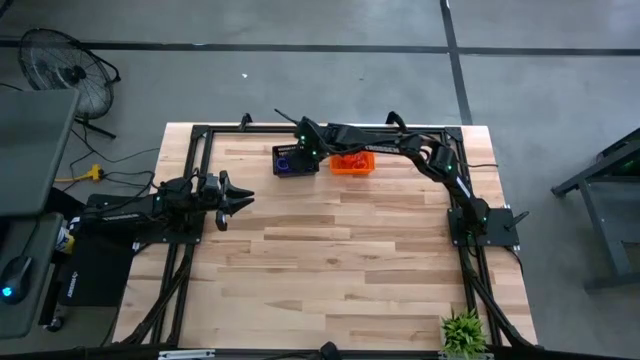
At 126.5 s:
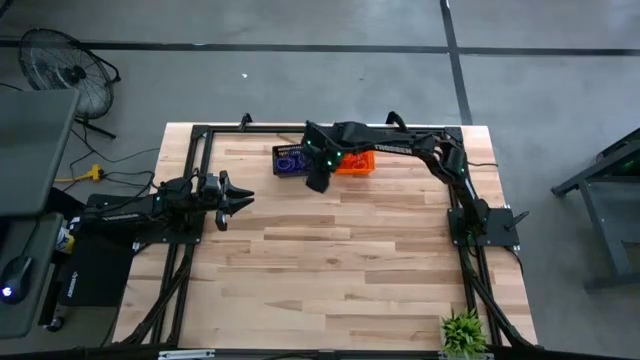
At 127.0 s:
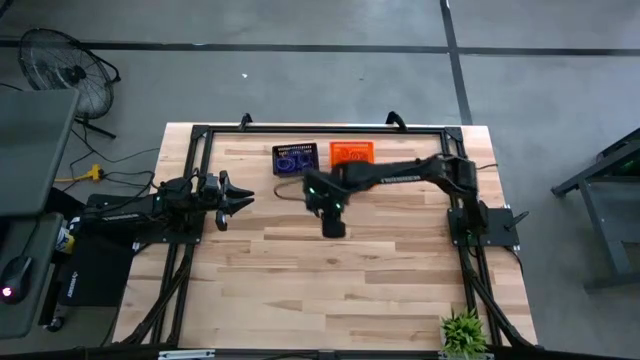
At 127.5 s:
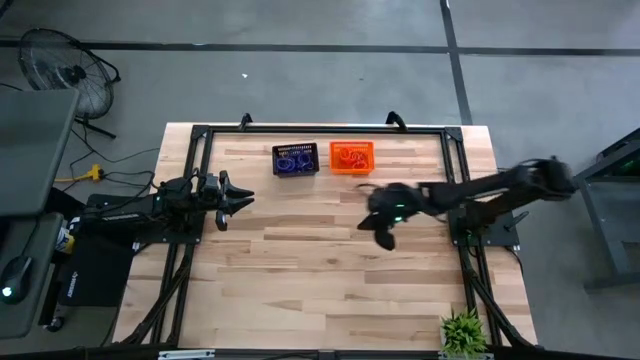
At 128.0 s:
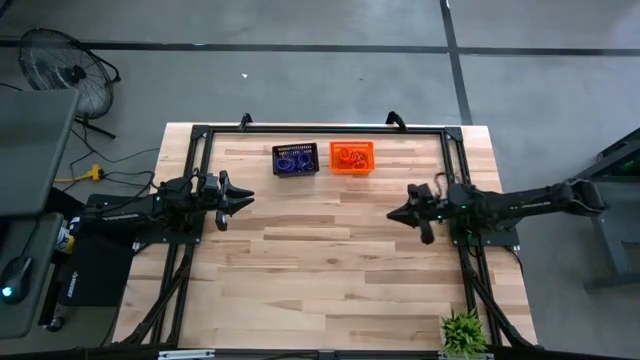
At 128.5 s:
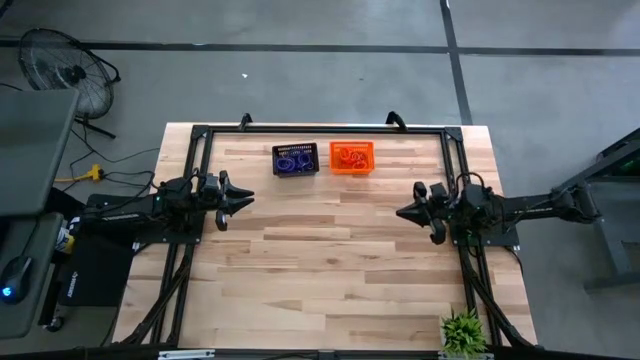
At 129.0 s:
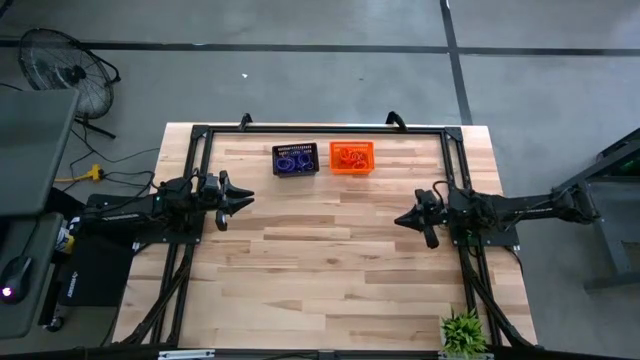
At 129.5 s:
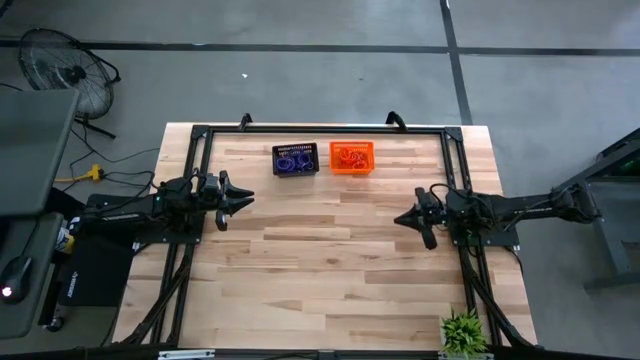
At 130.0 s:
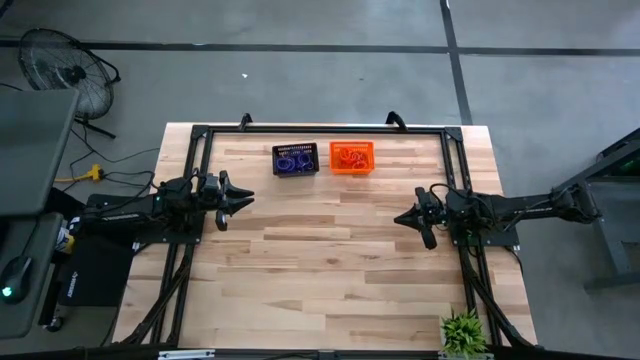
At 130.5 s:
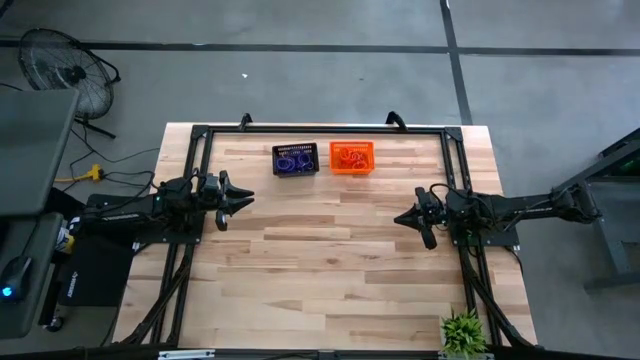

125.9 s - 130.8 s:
Task: Sort spring keychains
Return to Home Position

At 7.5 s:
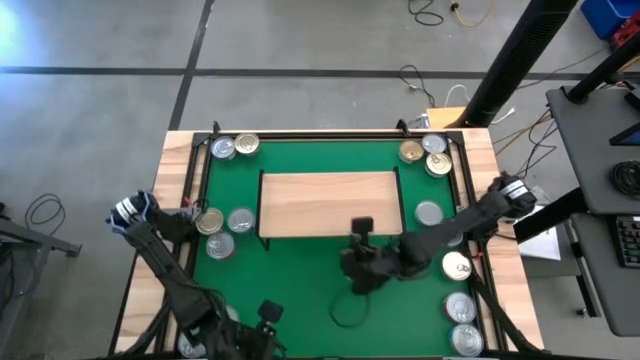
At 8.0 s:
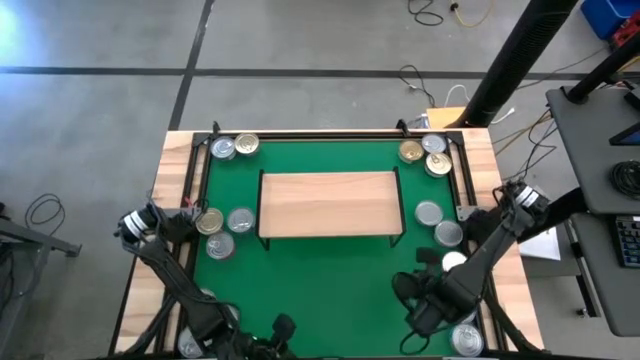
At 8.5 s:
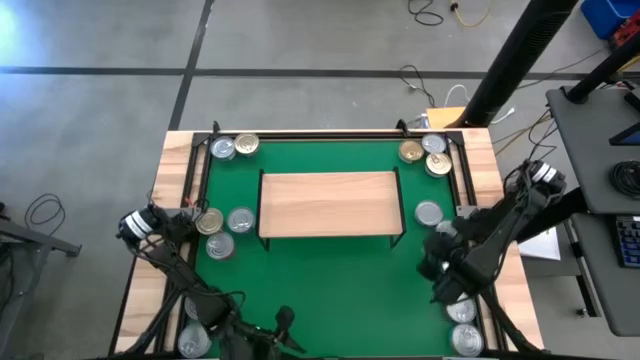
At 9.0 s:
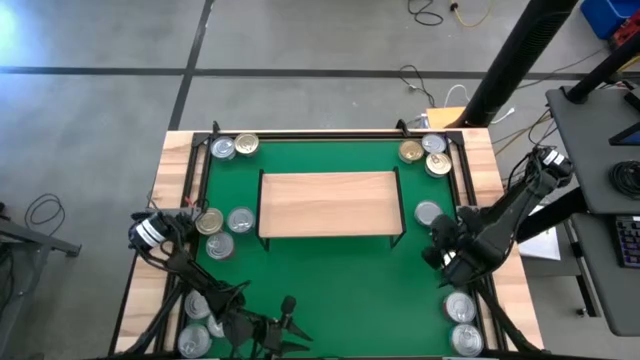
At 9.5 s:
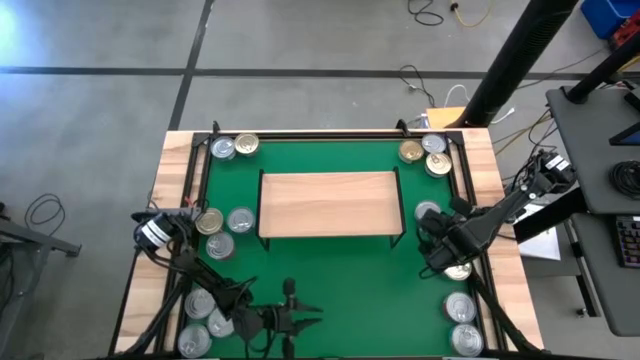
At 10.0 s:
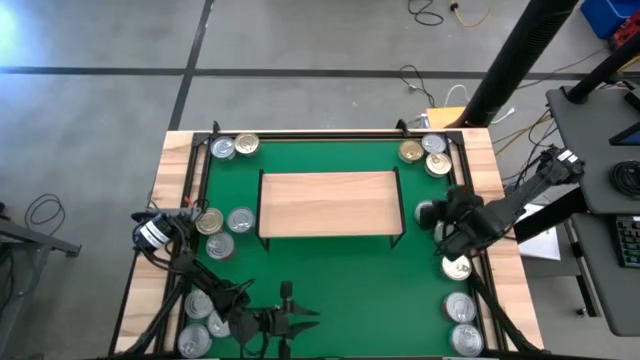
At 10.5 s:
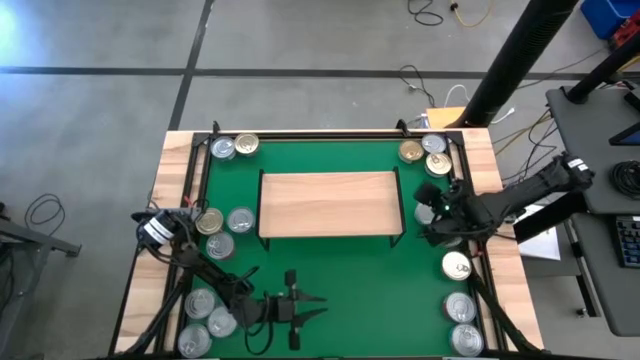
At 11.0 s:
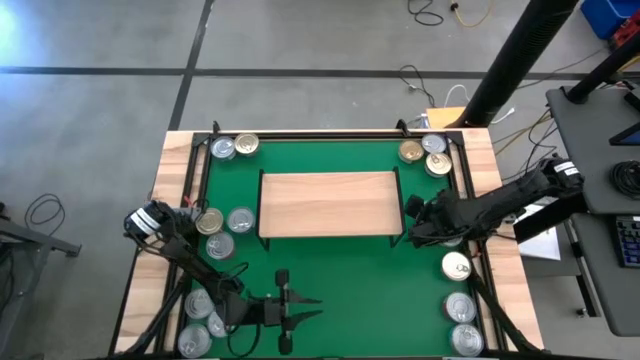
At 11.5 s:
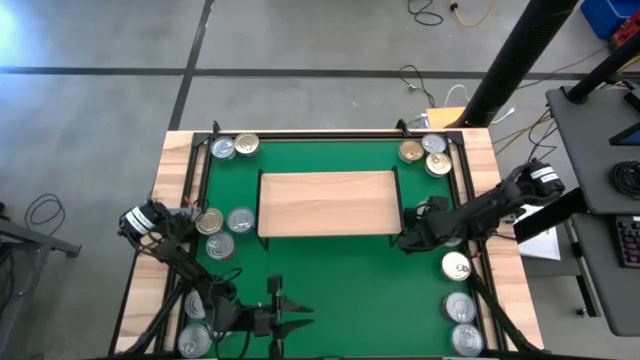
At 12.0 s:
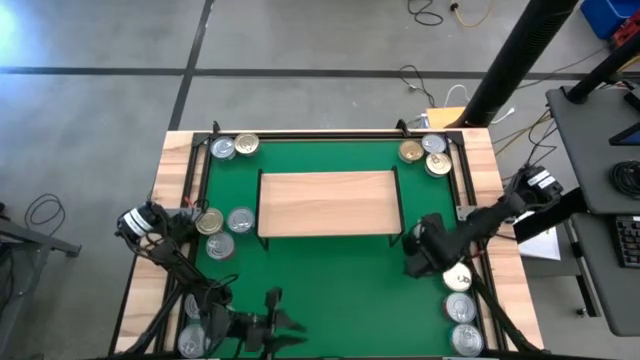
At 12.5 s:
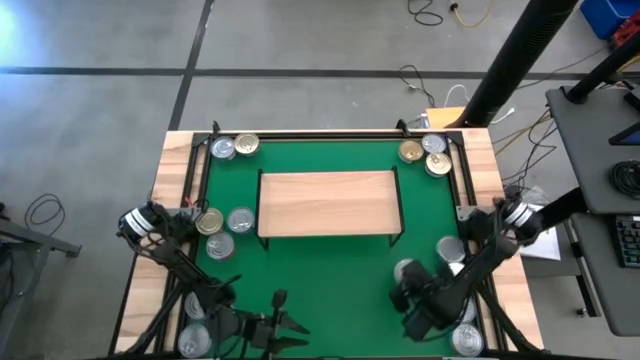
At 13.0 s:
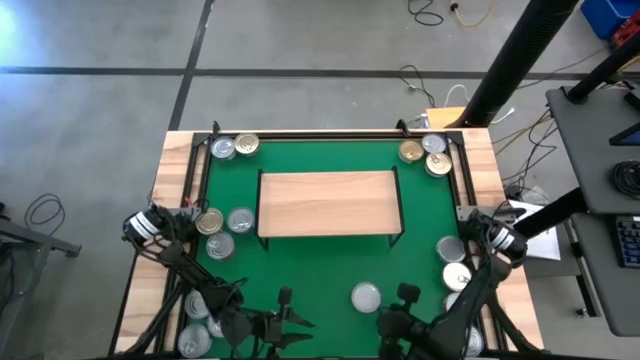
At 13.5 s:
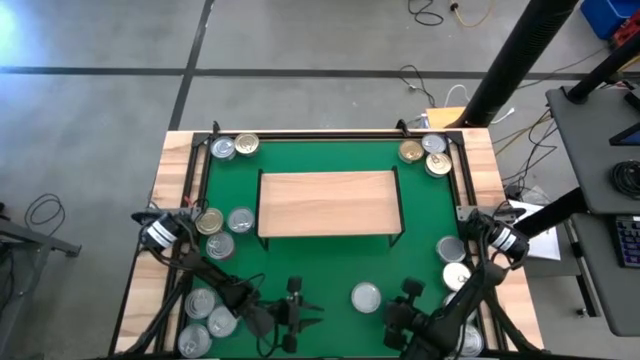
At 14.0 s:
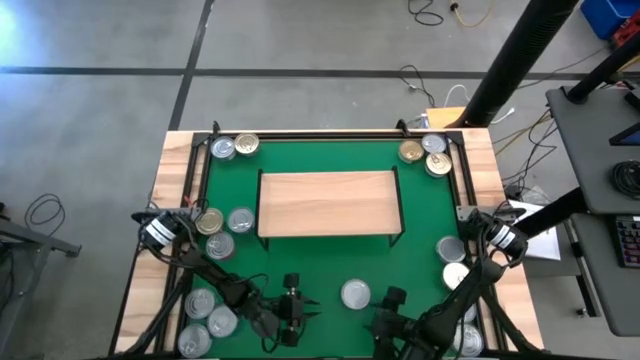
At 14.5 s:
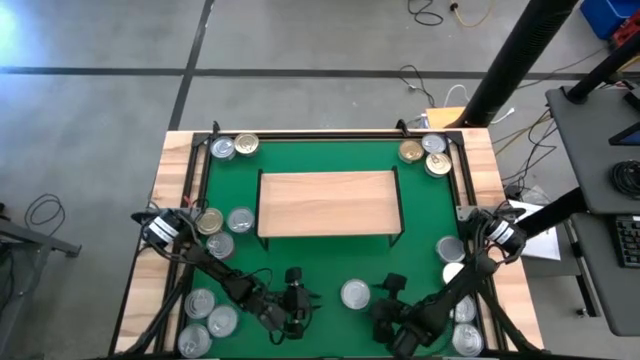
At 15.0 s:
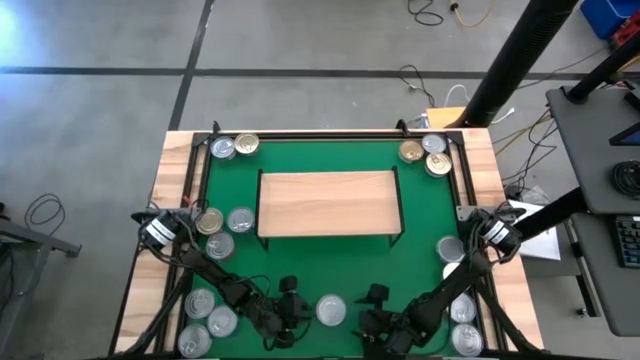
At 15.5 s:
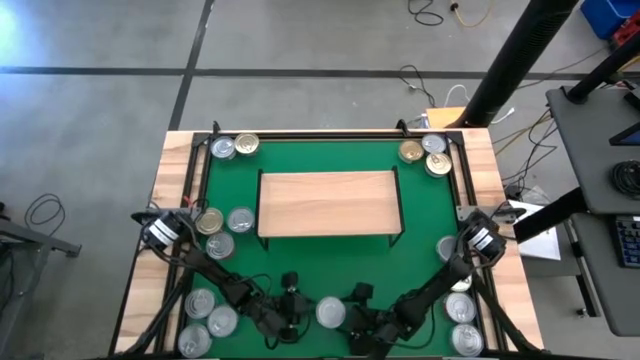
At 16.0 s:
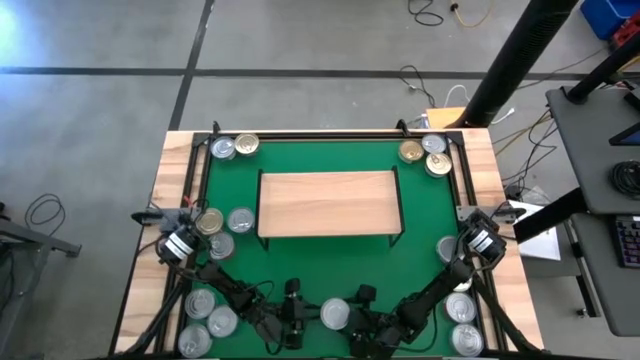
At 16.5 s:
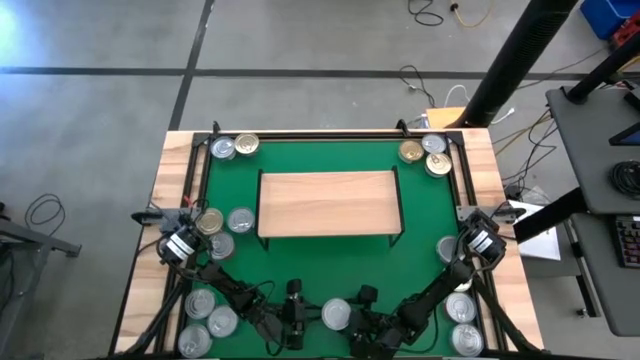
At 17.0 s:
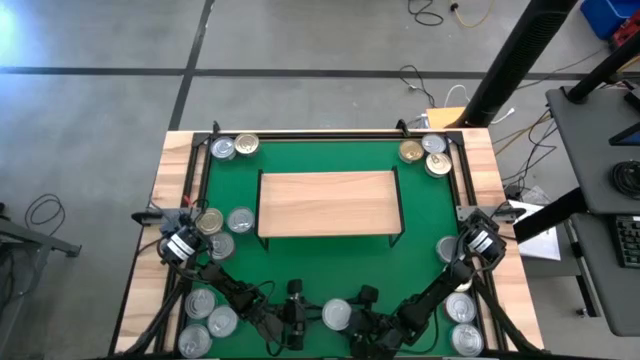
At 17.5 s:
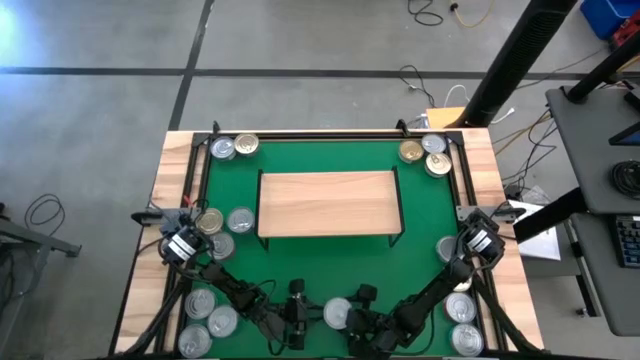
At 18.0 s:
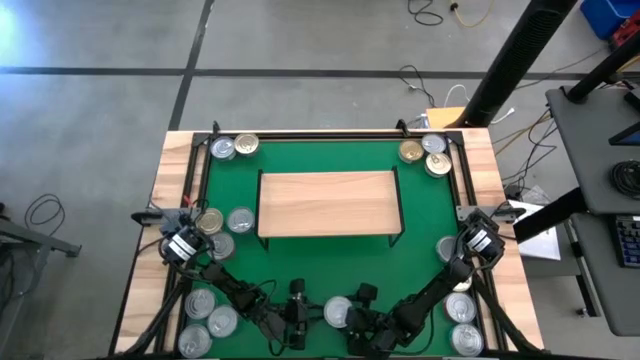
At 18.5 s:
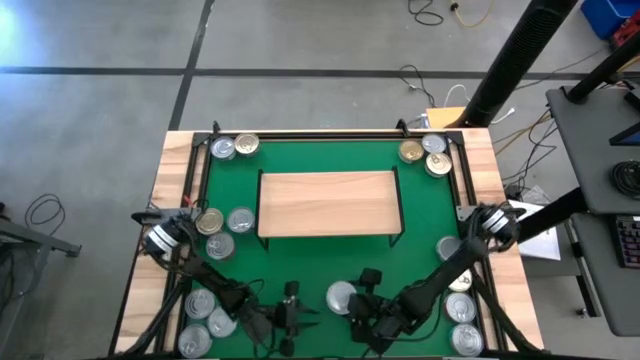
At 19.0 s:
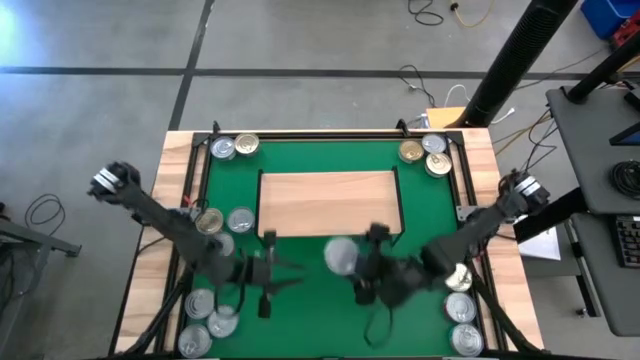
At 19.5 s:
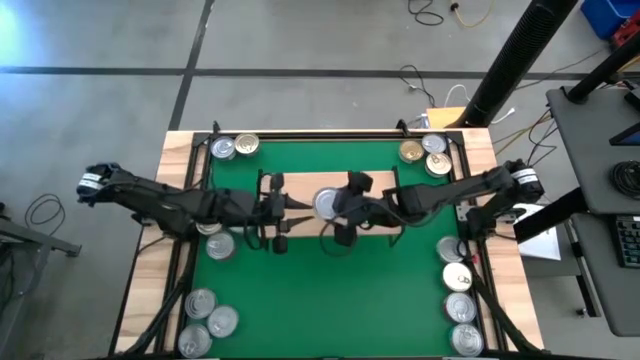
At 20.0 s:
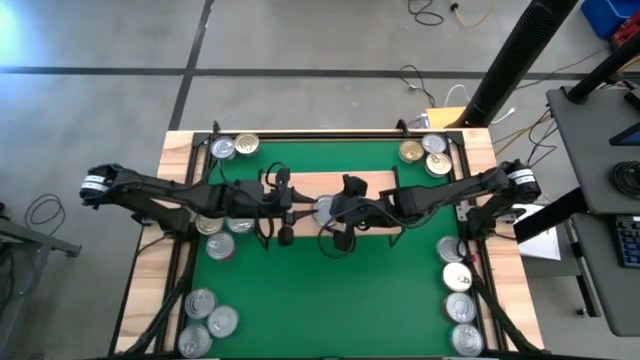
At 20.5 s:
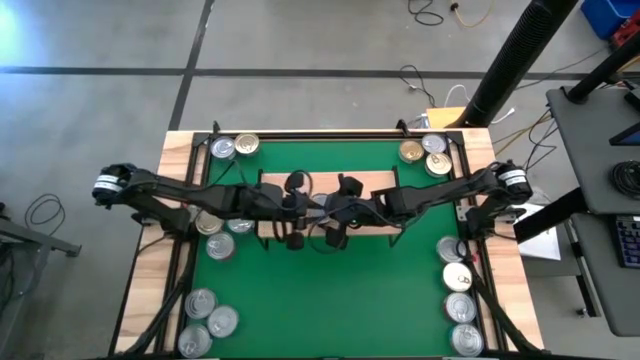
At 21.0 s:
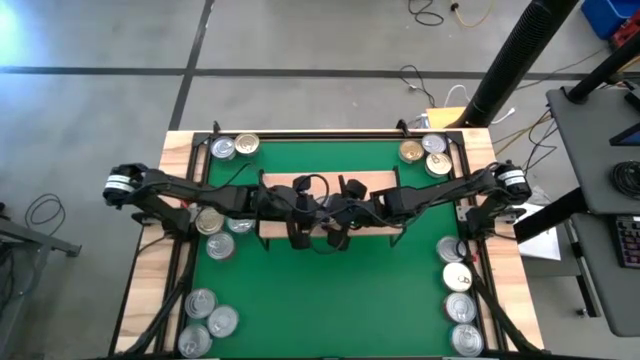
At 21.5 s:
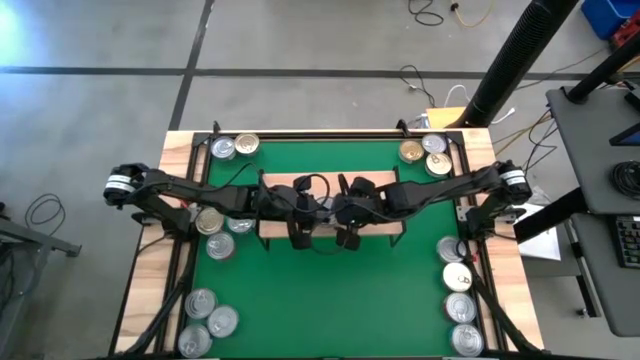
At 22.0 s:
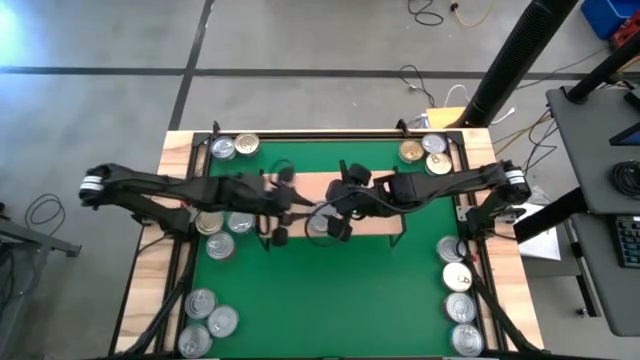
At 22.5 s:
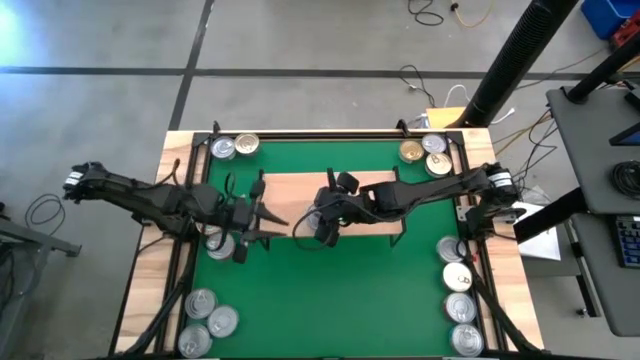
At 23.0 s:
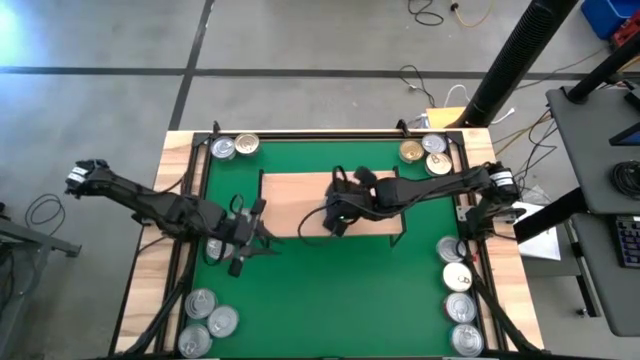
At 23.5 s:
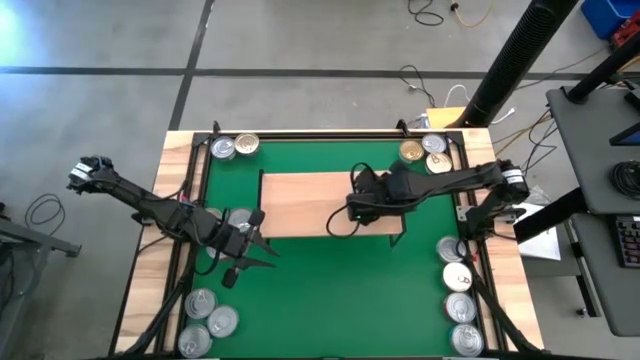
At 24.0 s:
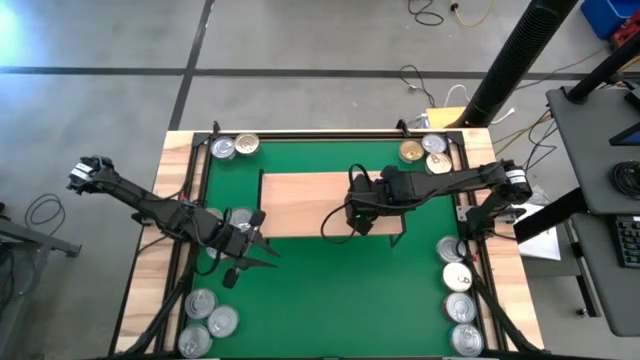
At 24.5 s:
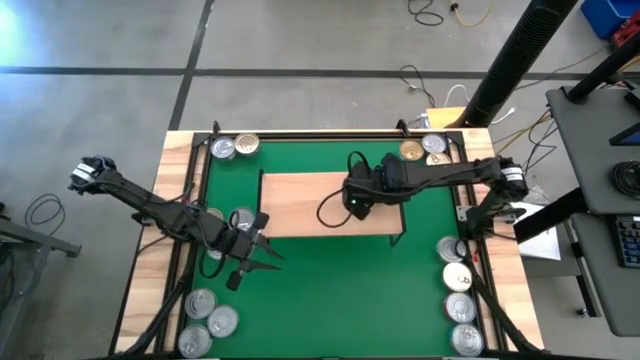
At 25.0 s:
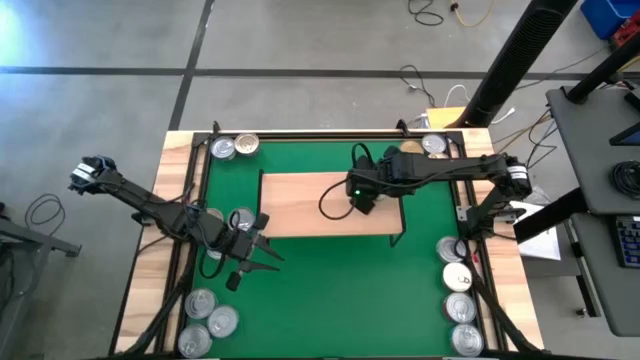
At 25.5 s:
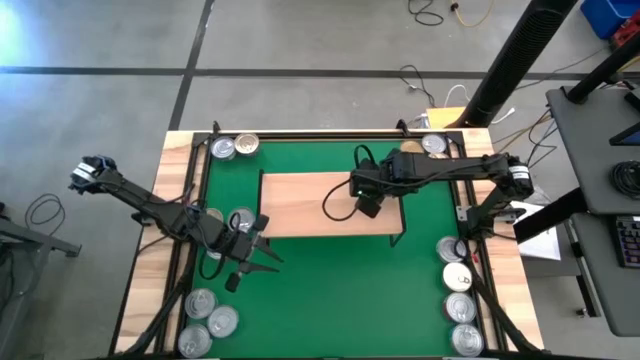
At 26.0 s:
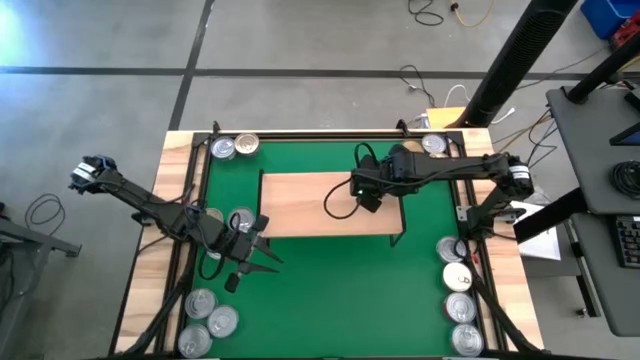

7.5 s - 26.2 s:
Task: Stack canned seafood by type on shelf
Put the top green tuna can into the shelf
